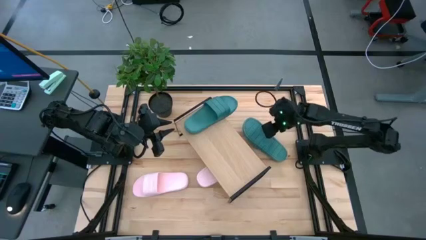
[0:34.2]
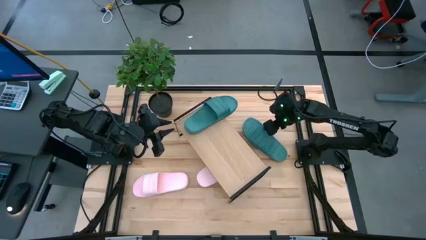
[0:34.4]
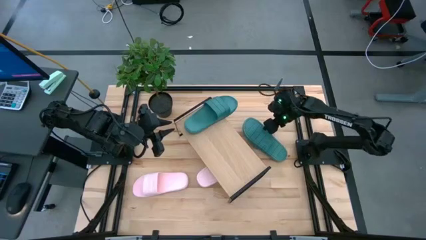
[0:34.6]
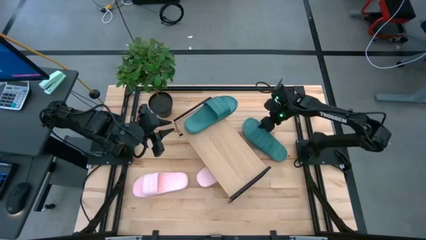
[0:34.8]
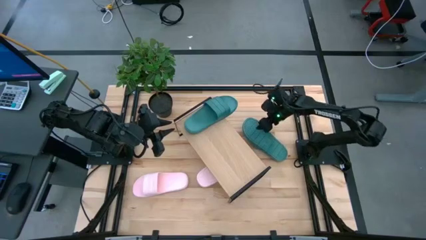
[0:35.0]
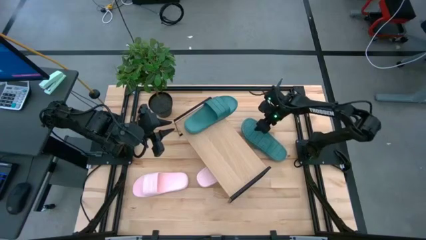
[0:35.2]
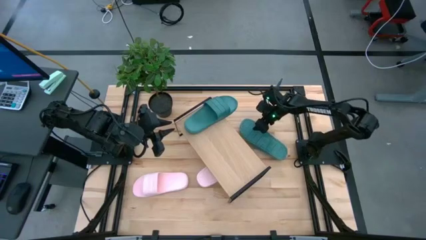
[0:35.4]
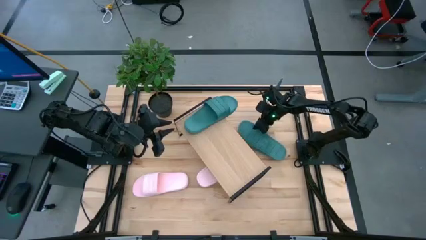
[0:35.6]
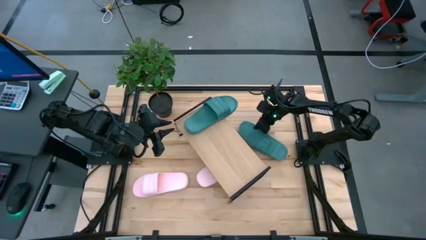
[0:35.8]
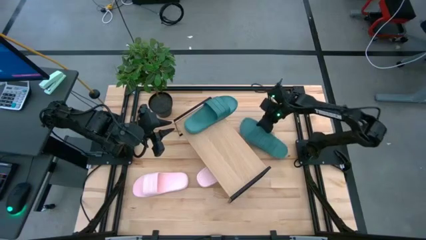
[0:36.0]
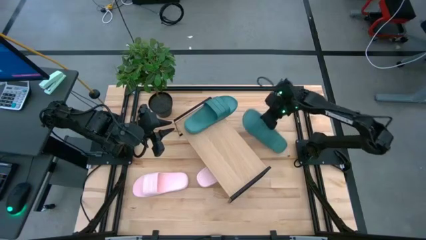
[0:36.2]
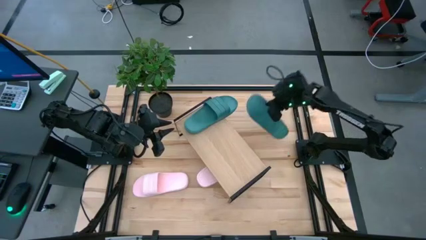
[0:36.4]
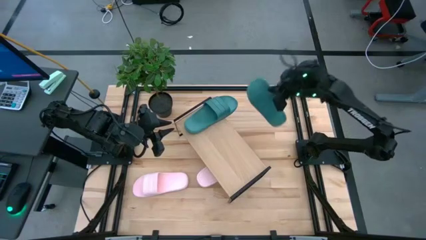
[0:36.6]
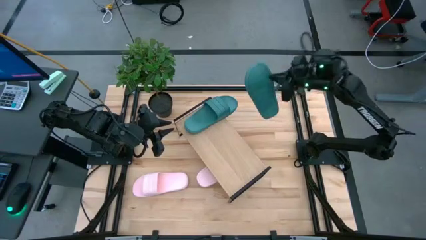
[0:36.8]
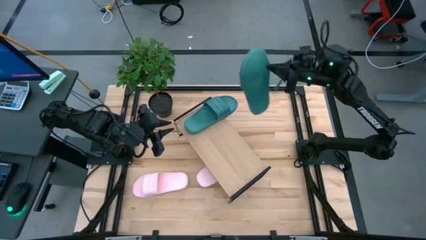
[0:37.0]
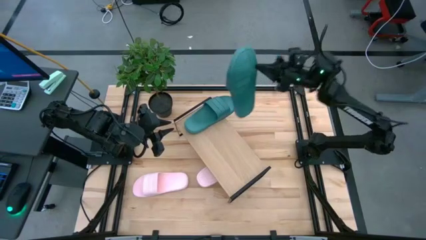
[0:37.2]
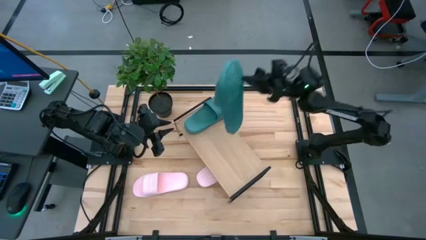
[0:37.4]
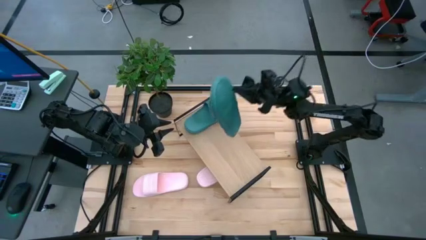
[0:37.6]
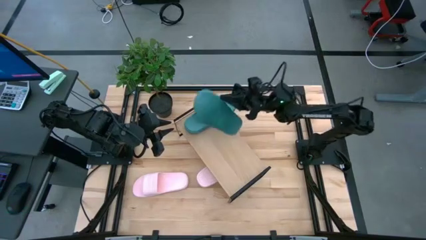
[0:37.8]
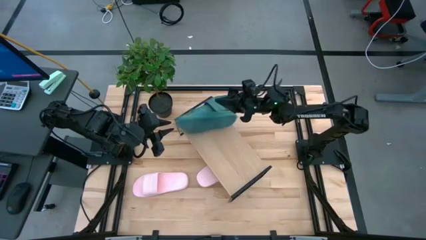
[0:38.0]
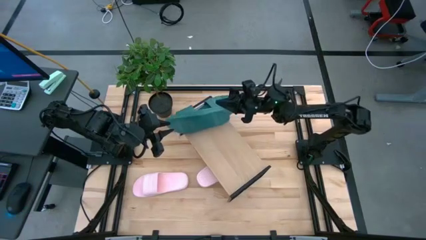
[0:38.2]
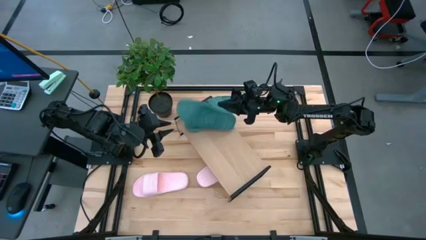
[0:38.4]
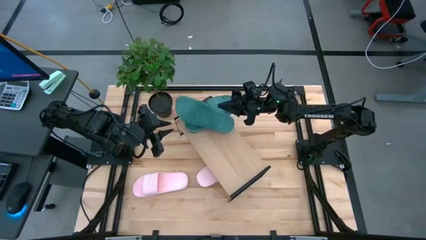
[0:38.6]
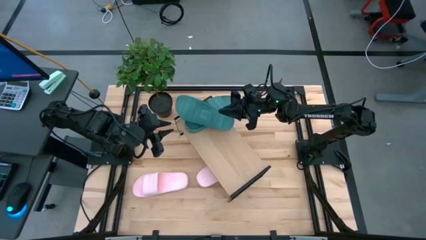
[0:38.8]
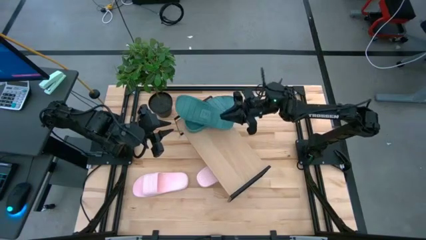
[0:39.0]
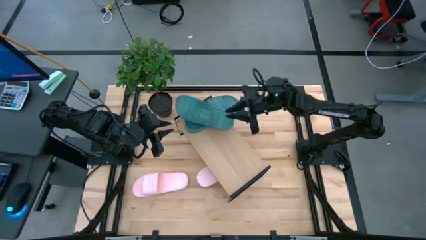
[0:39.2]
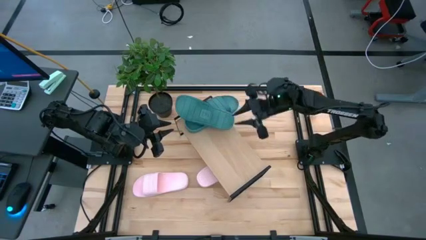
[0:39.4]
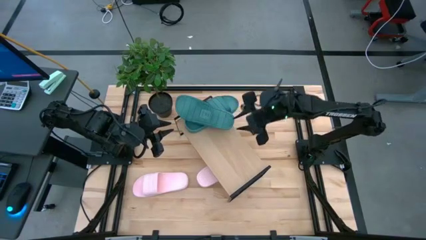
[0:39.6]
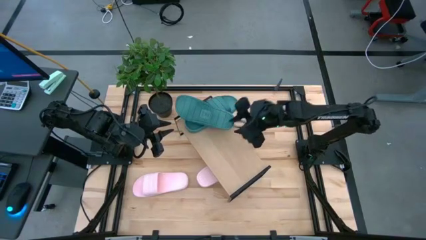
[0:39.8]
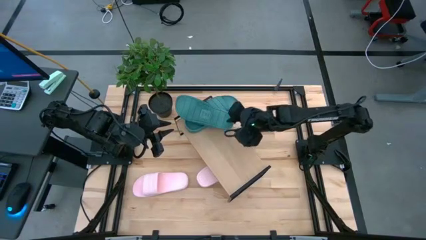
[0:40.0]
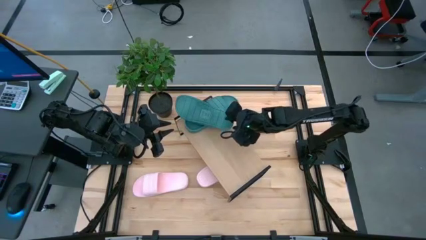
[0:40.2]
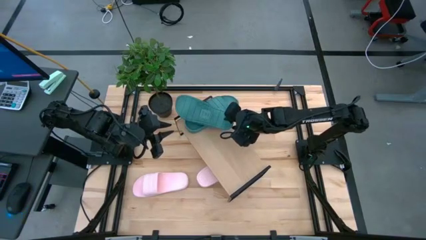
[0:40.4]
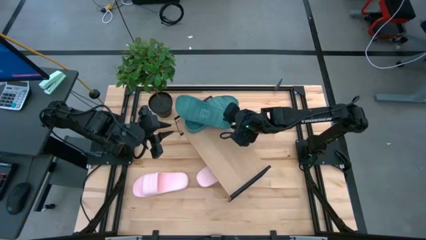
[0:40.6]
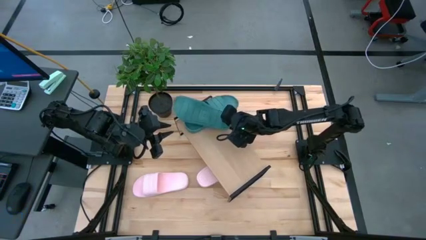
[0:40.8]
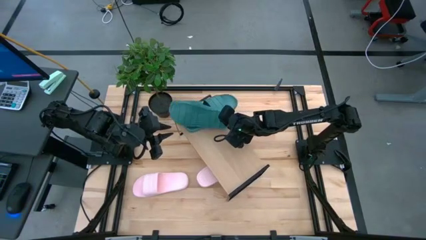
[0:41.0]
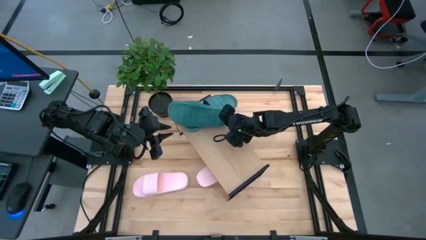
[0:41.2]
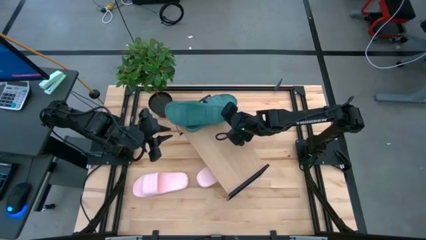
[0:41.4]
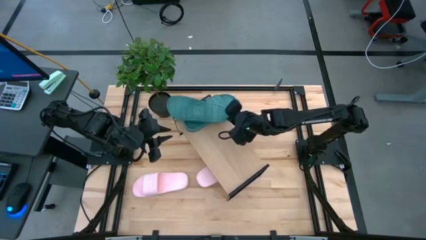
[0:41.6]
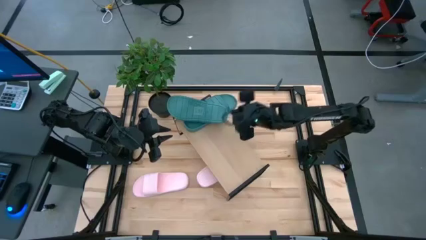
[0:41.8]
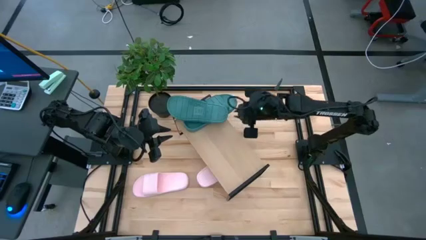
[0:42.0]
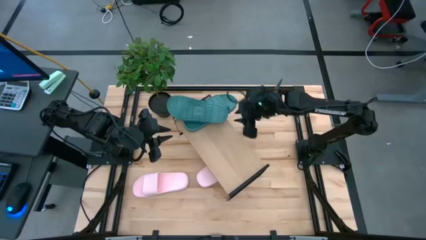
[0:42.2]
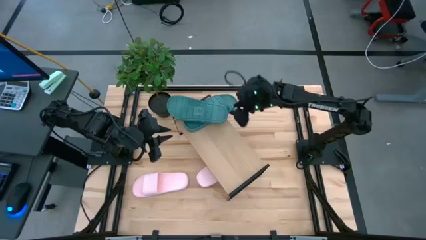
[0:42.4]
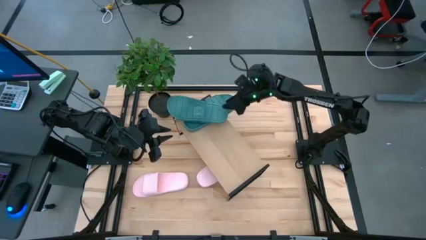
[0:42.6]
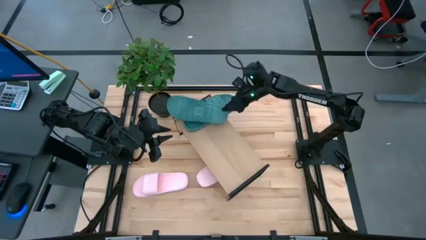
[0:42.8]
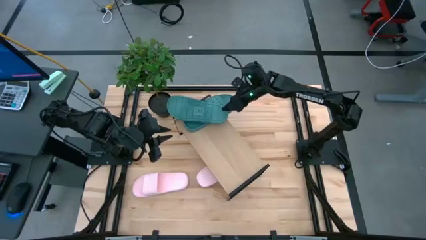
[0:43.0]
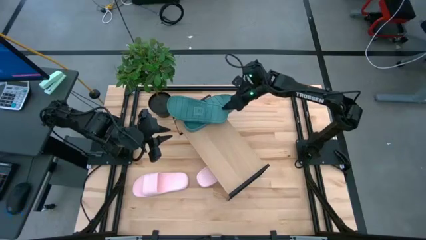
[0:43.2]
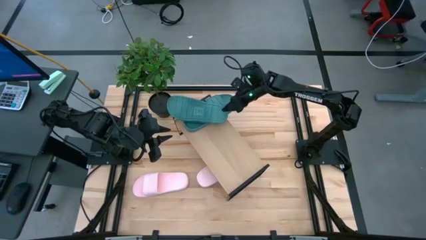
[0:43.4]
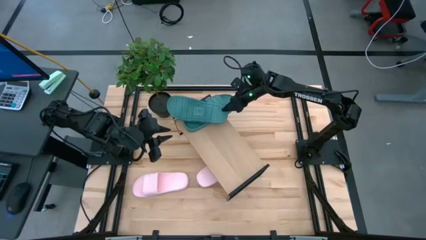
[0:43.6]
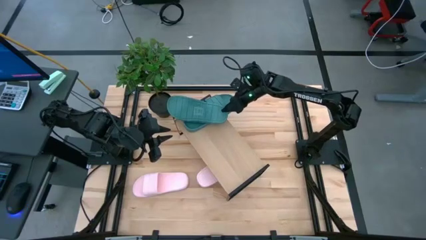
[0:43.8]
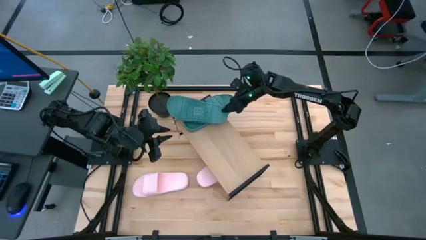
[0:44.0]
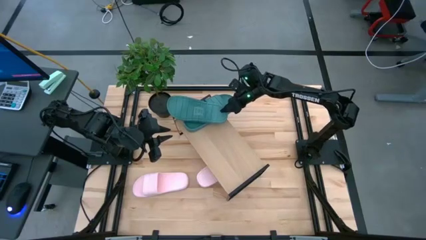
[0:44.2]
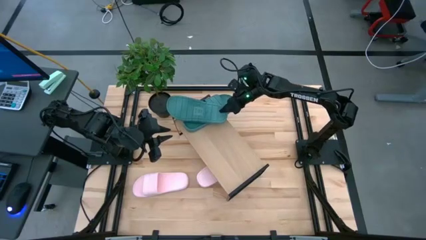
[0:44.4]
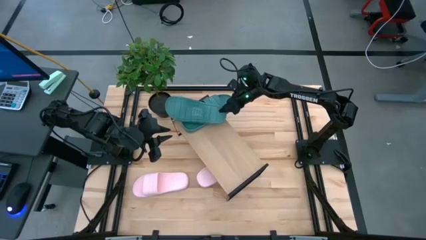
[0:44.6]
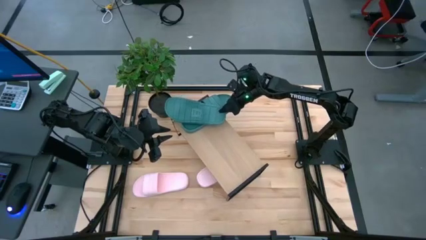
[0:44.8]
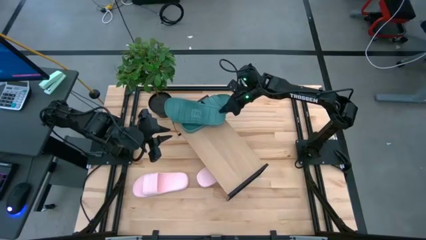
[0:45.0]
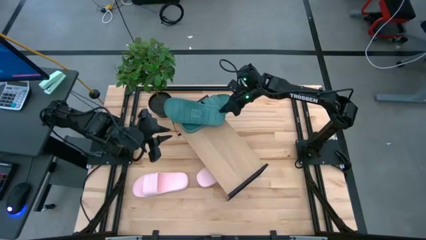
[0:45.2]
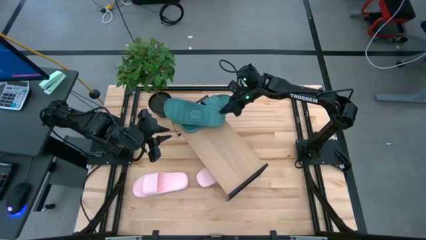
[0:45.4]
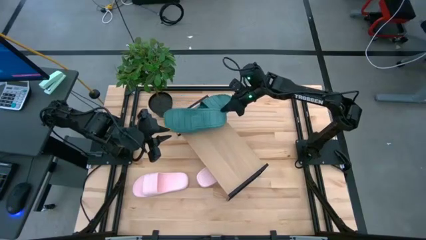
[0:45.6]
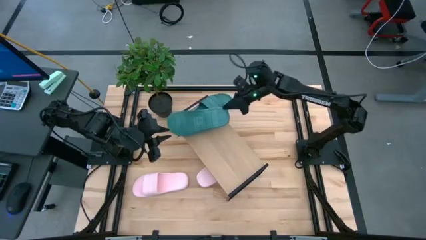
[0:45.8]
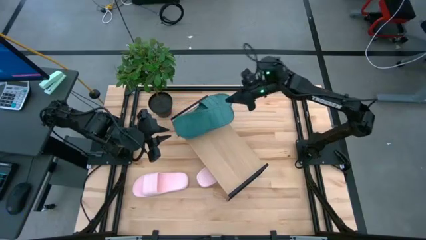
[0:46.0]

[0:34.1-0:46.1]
Task: Pick and place slides into the shelf
Put the green slide on the shelf

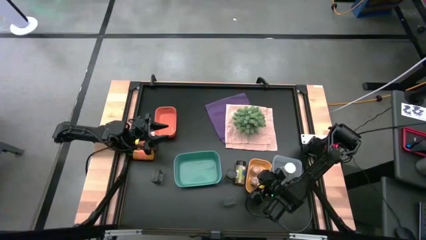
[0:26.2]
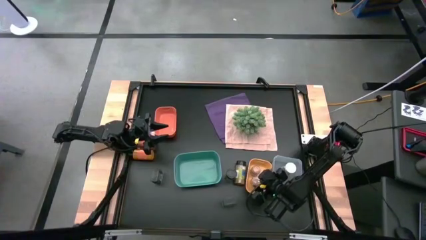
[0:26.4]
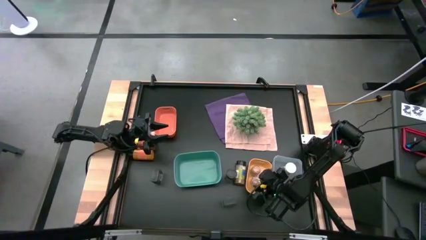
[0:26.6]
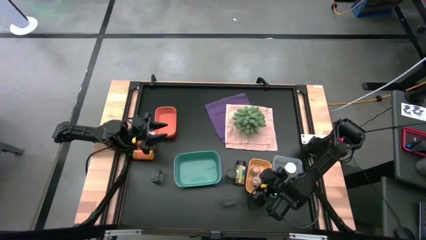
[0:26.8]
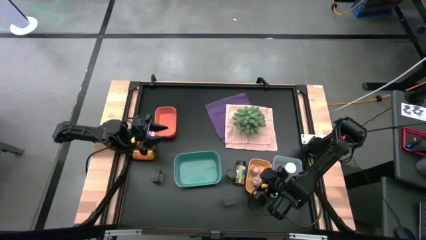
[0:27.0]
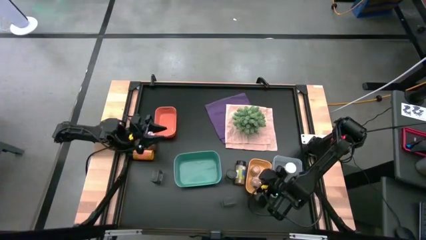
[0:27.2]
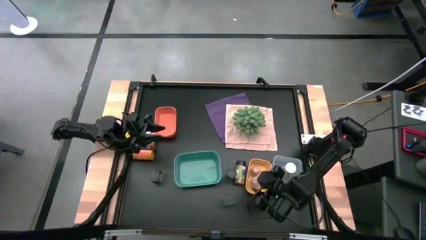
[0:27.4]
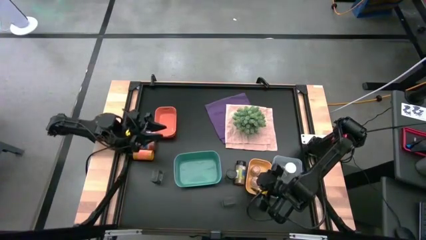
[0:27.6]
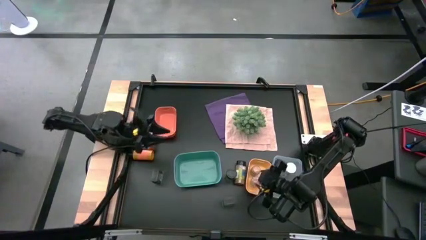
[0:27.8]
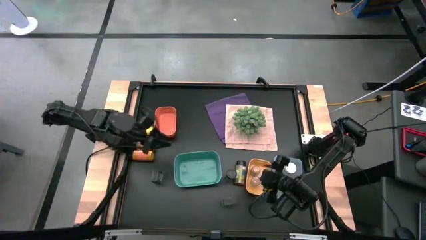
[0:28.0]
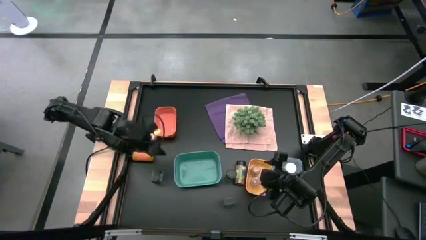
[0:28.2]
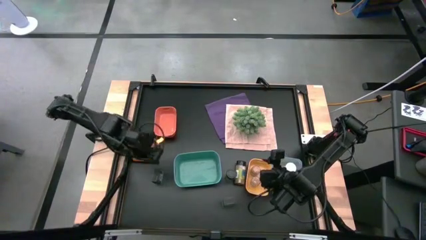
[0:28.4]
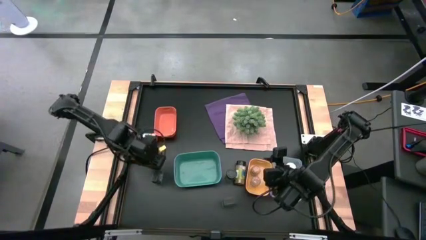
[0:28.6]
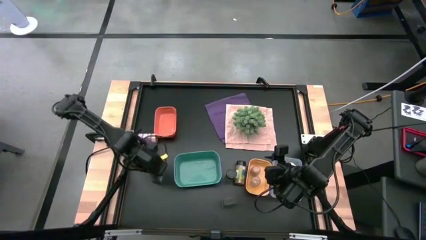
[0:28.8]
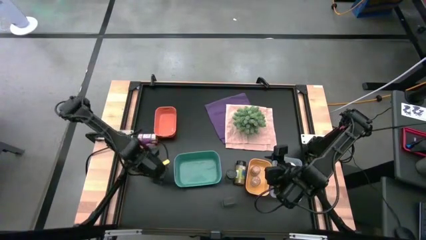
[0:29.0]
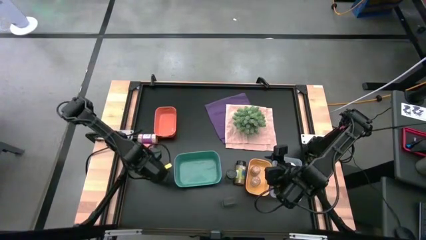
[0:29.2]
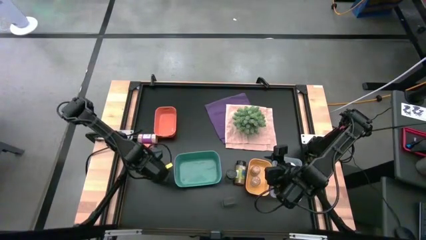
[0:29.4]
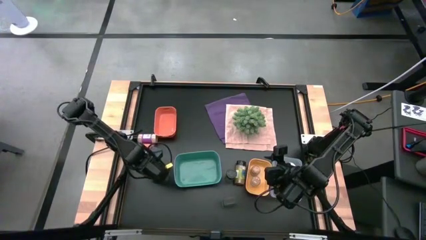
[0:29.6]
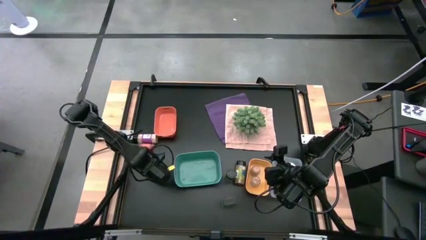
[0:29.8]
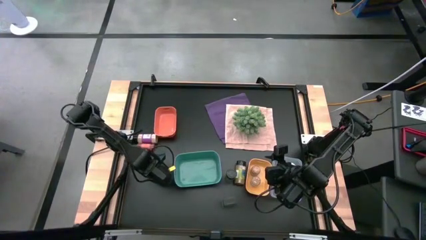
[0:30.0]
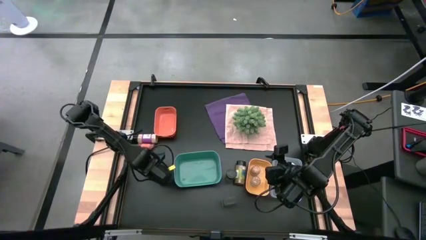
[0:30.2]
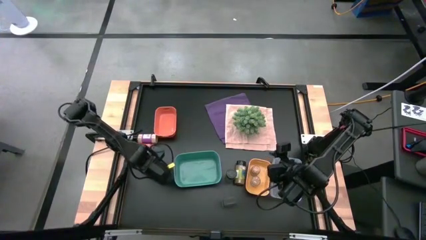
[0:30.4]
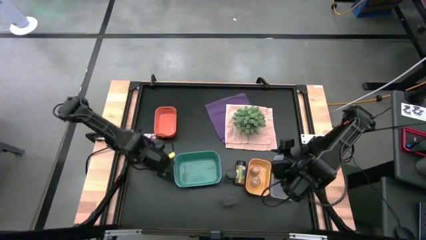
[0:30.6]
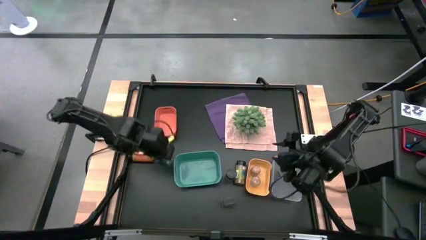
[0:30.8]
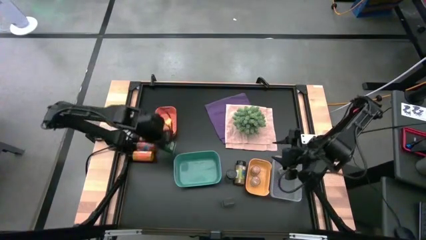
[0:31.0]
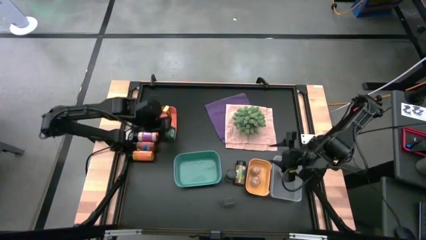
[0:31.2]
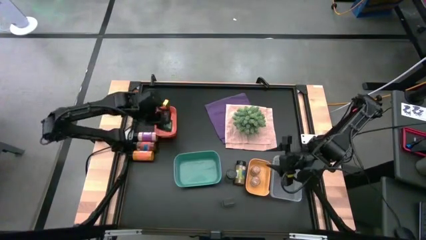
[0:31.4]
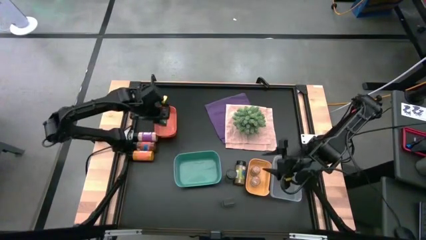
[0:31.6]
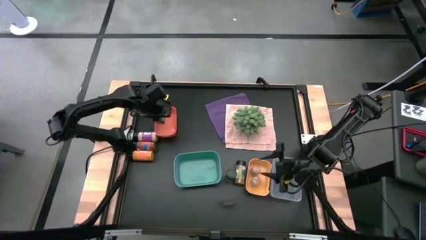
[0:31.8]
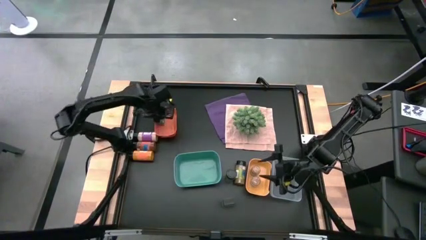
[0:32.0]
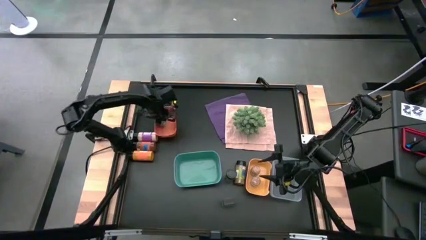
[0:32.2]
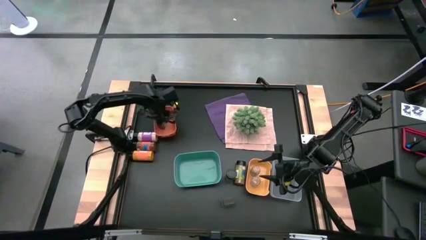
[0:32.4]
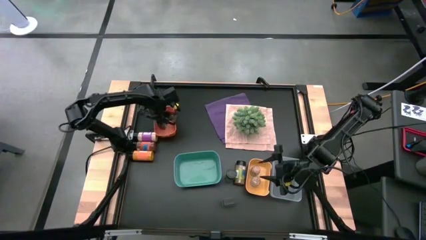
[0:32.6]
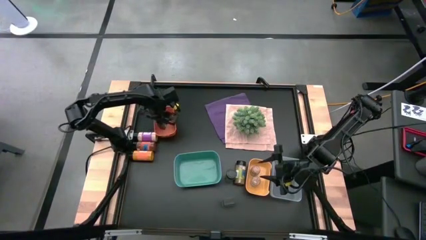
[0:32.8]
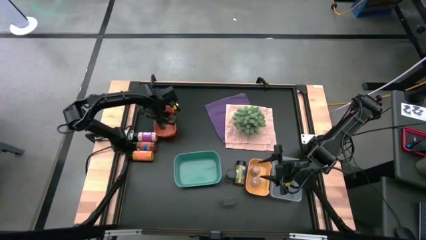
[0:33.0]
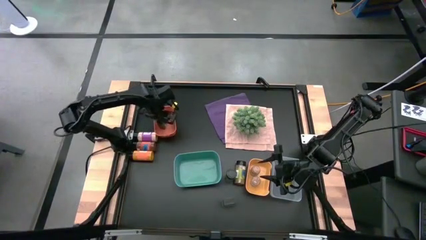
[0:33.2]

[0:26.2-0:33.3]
Task: Sort spices by type
Put the left green seasoning can into the orange bin
